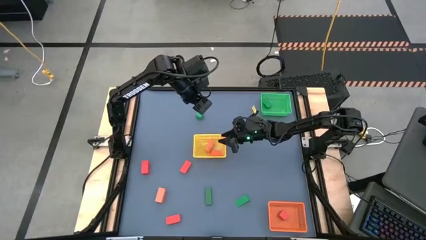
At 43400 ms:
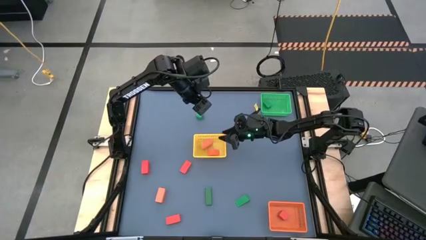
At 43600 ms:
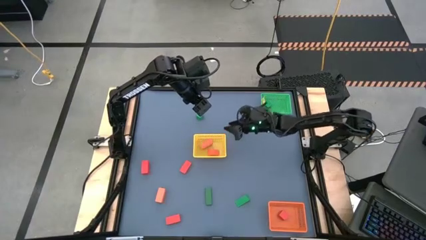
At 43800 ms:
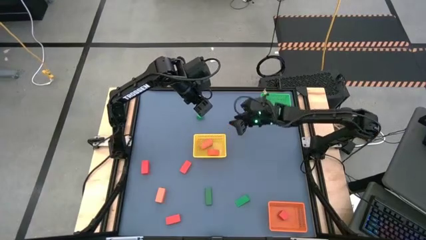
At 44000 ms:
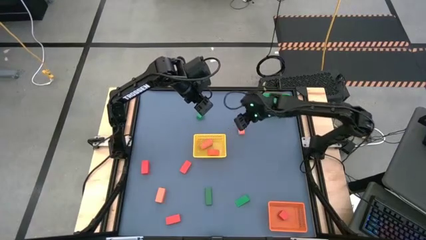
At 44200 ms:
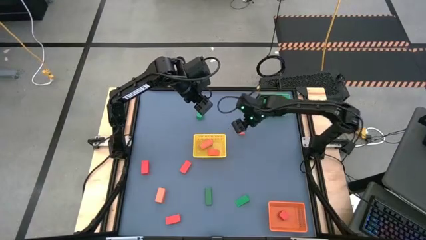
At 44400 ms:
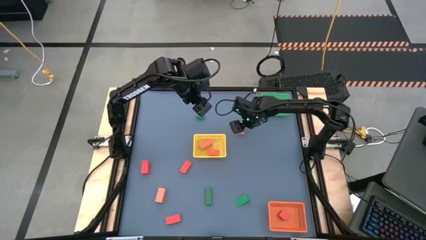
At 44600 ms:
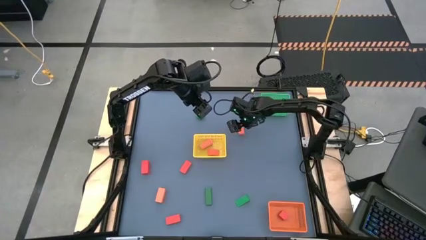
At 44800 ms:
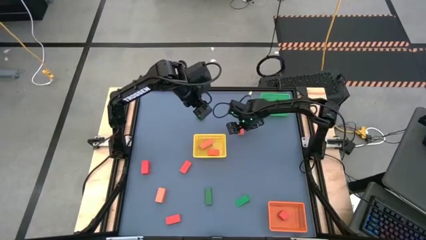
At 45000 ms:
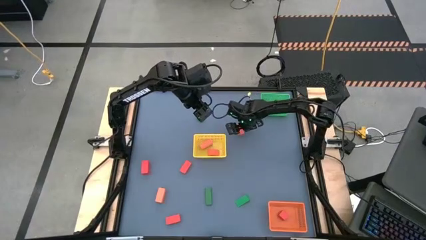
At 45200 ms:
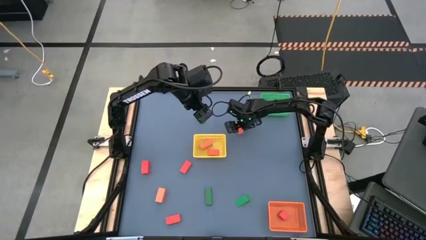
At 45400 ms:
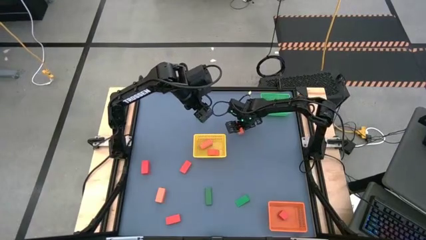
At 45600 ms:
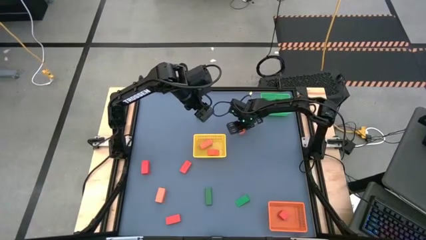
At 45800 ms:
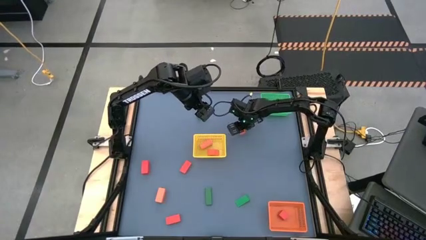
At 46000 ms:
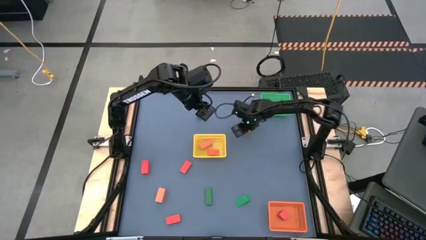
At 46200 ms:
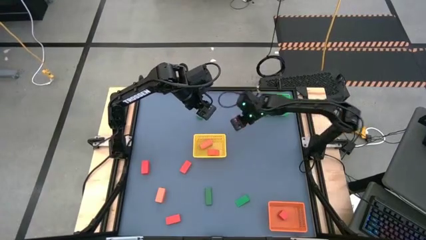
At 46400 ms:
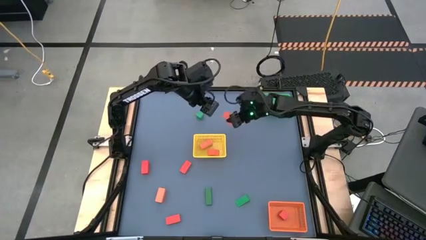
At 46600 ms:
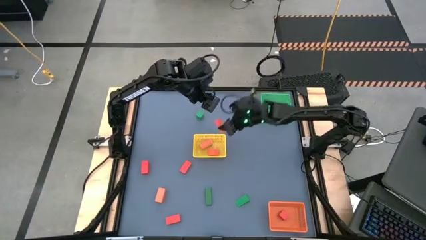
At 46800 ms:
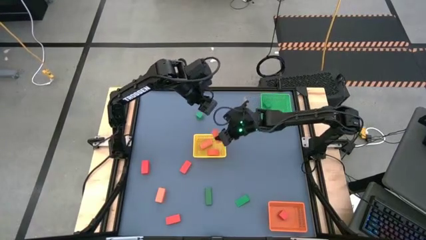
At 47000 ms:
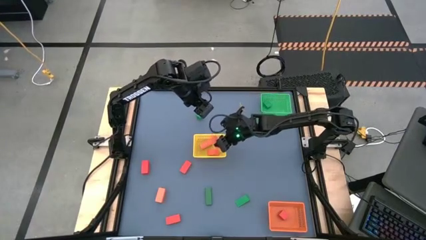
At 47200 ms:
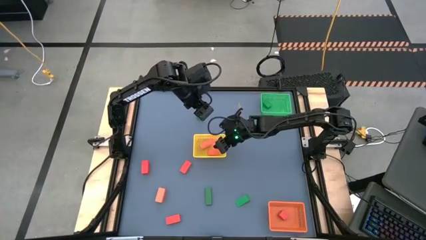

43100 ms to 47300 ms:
Task: Sort & place blocks by color
Put the orange block into the yellow basket

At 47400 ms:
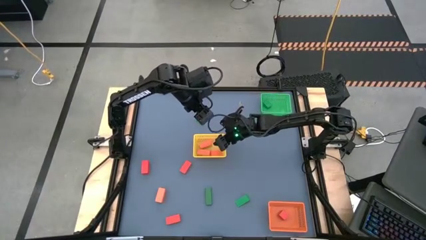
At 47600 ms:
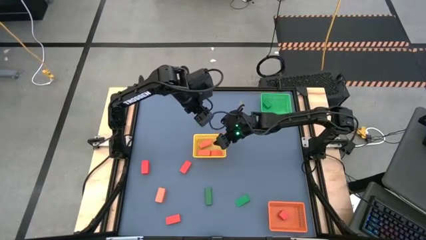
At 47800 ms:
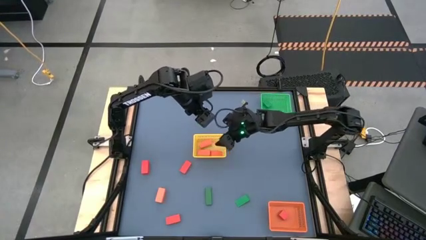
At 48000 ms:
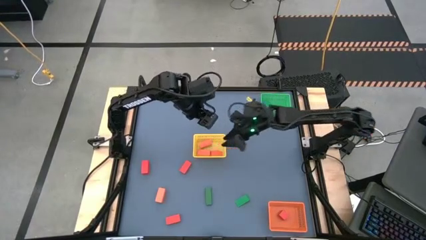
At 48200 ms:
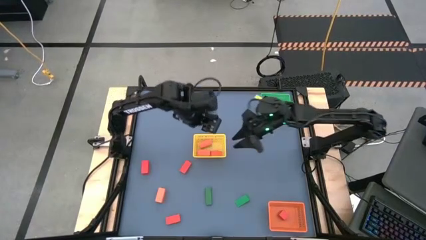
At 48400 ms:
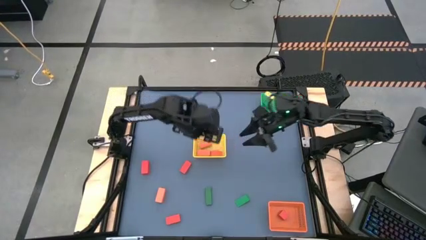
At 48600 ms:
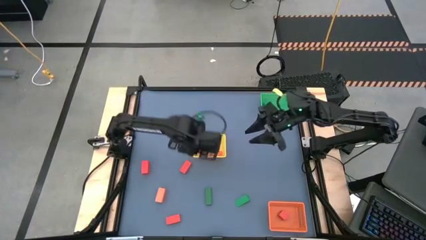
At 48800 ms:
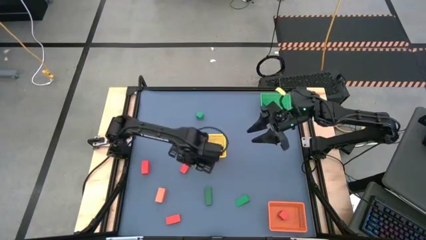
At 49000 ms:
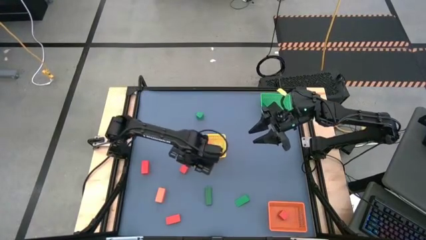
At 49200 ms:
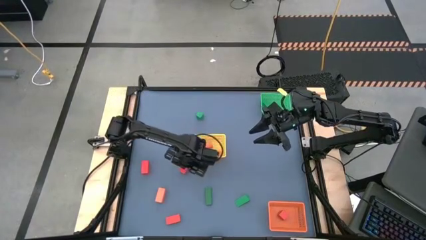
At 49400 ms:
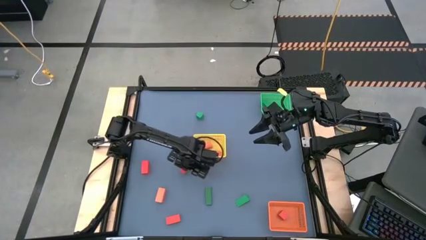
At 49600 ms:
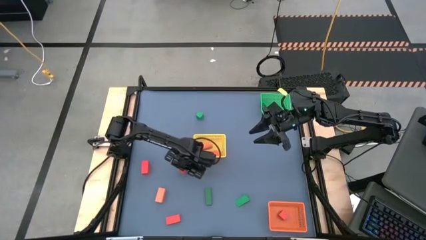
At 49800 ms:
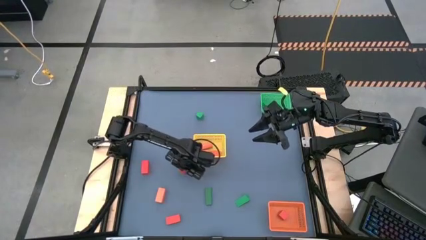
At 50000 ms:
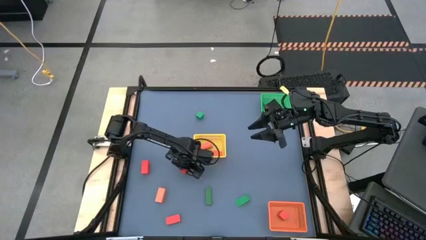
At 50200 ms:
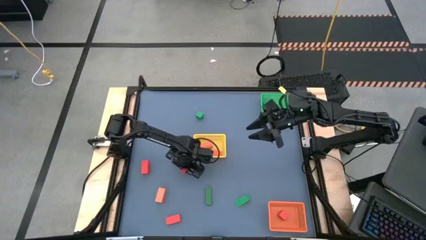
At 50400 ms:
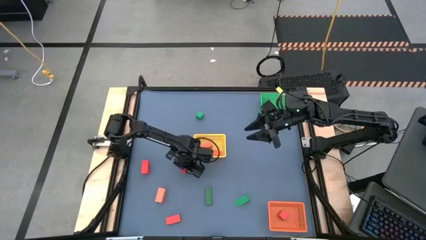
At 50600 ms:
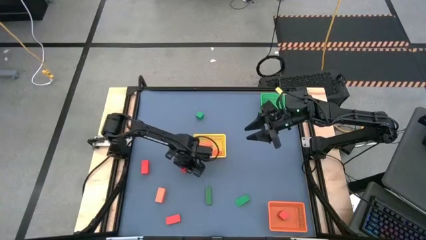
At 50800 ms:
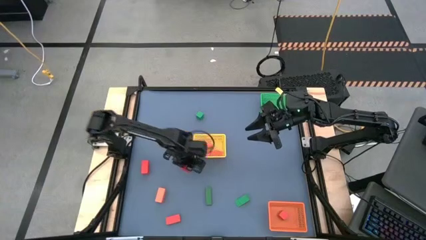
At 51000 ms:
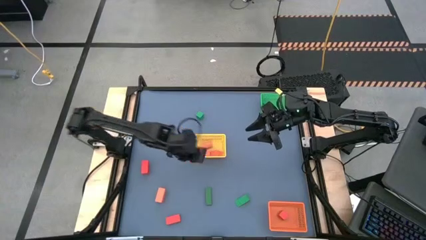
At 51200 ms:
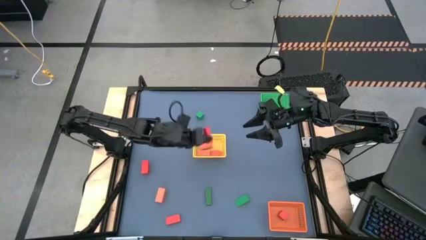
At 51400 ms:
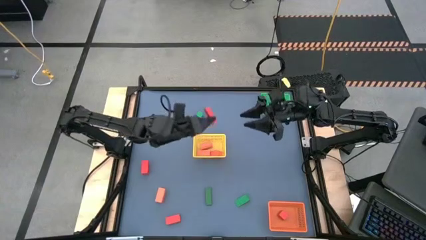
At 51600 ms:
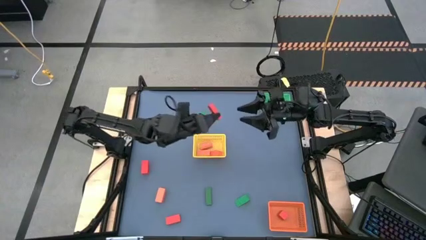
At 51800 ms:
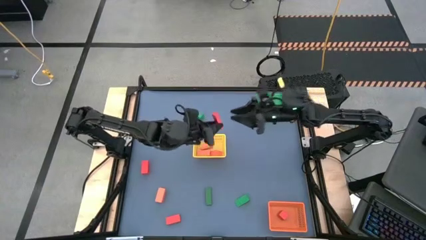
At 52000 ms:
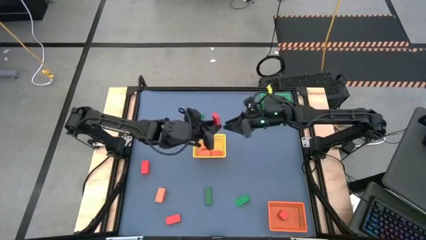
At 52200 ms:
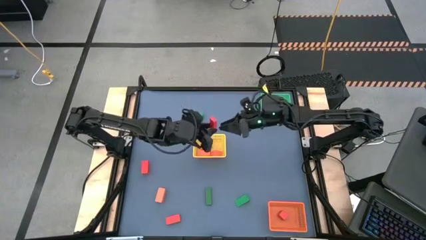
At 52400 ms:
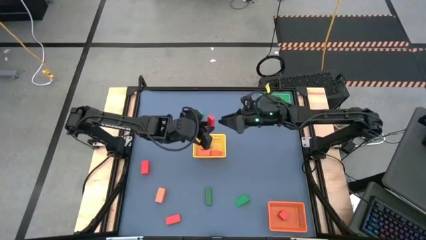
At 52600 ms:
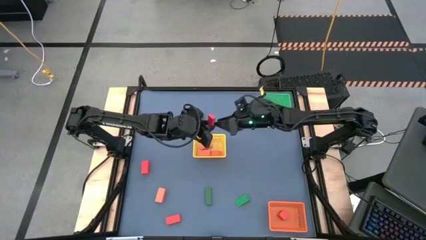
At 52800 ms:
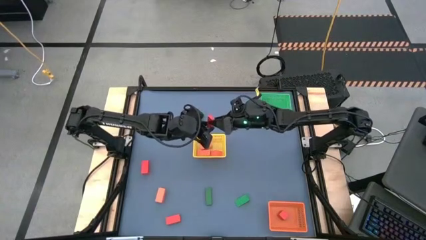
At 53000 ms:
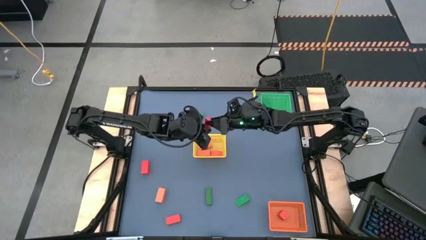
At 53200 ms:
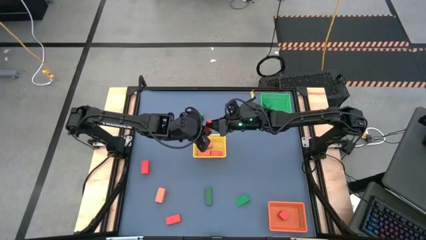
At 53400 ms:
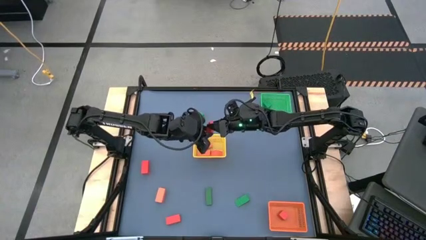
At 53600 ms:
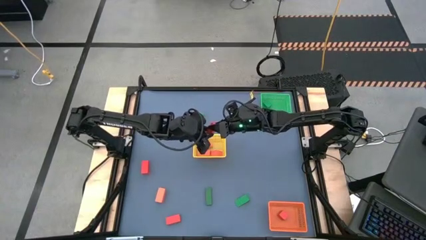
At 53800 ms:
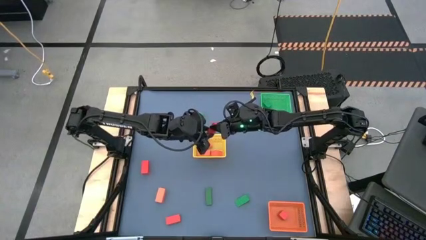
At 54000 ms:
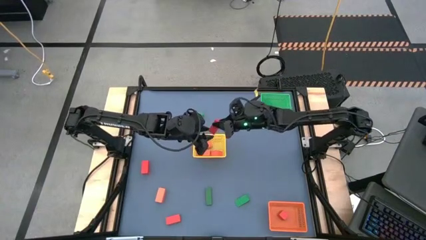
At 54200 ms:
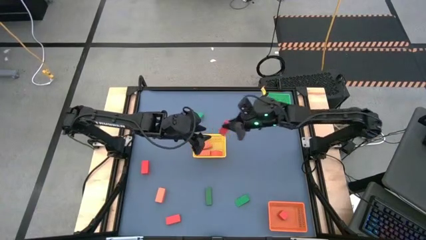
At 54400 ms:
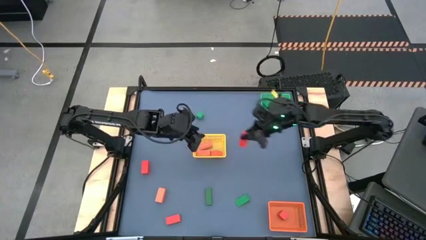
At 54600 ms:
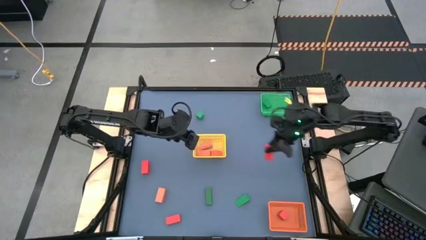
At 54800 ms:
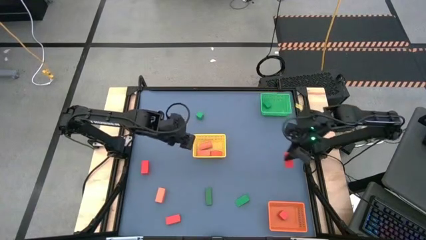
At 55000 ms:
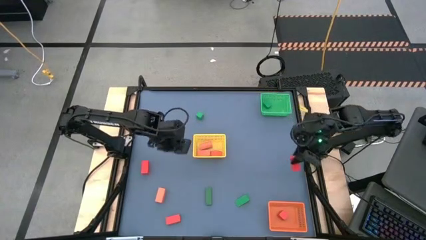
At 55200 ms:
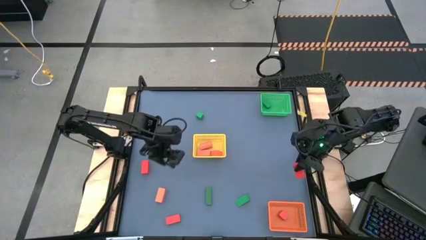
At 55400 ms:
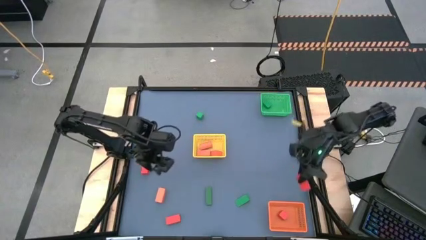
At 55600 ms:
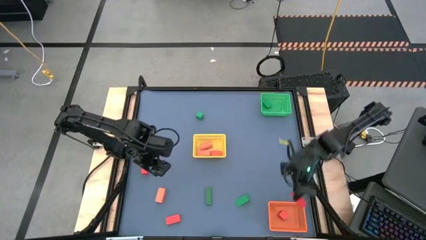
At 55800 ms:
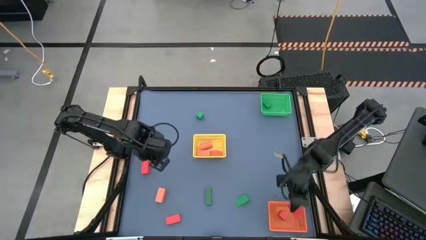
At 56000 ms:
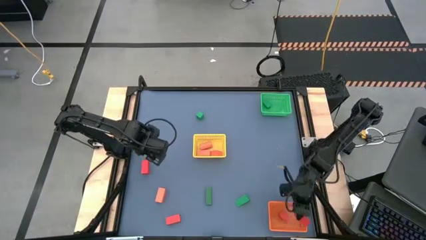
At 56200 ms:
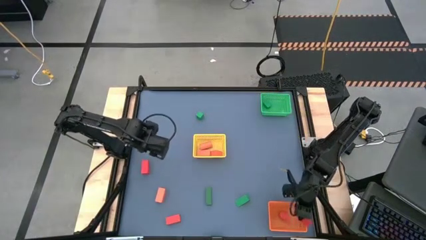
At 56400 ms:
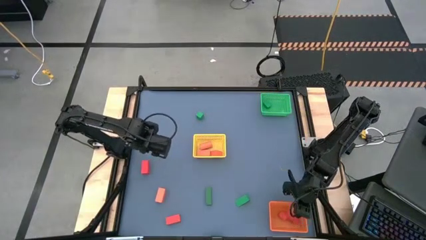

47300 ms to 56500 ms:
Put the red block into the orange basket

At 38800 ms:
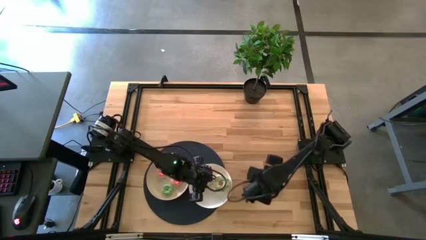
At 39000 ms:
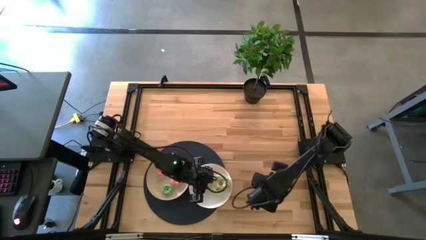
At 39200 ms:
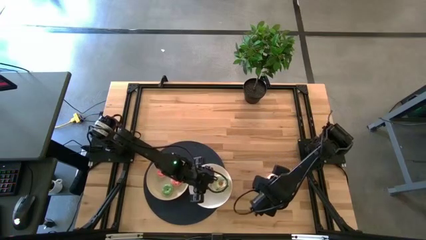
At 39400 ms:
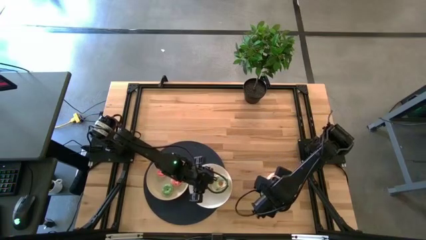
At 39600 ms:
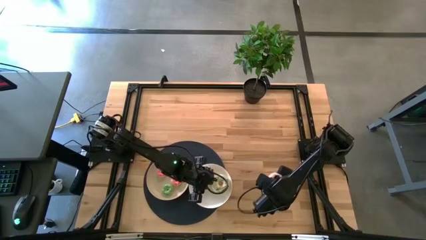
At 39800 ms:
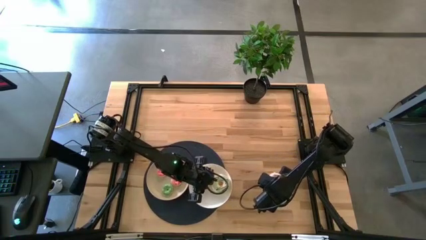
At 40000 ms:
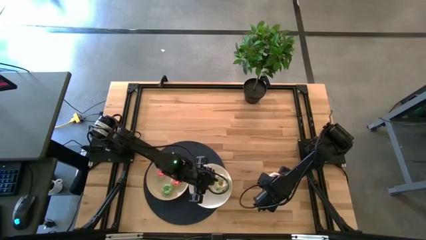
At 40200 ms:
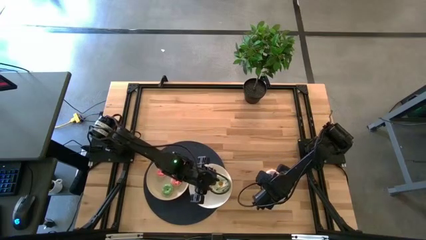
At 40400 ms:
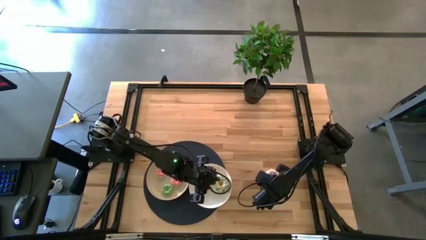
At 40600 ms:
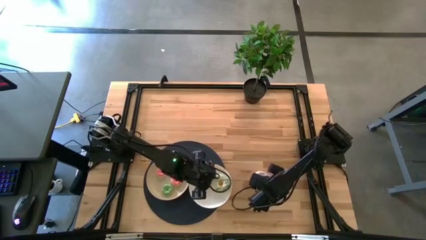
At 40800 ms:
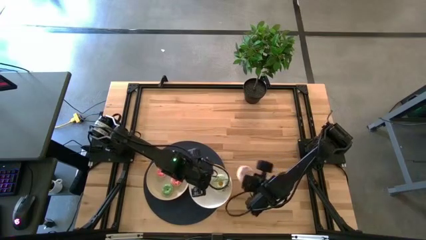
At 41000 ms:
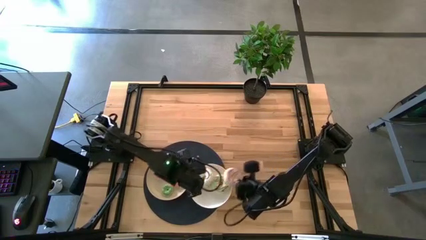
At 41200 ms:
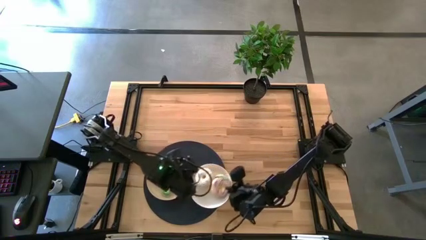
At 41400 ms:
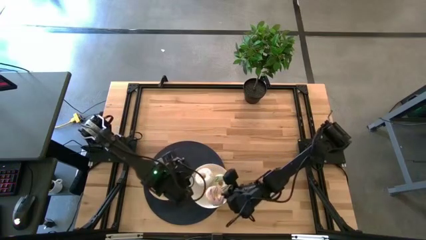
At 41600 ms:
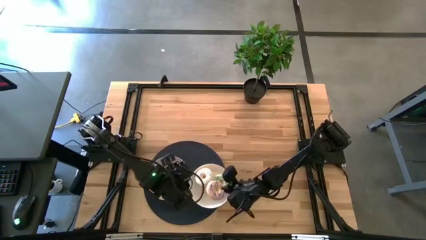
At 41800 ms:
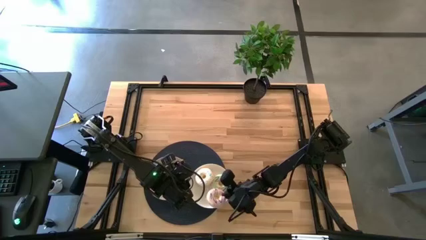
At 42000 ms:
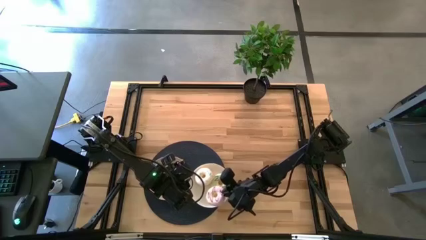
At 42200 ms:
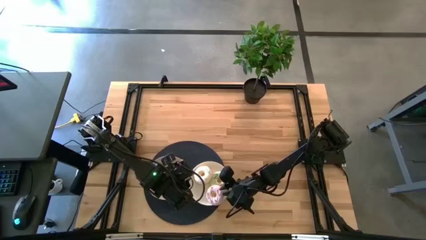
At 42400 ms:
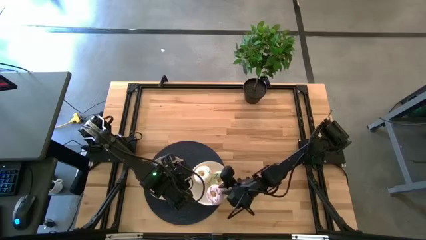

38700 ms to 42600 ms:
Task: Pick & Place donuts
Put the big purple donut on the right white plate
